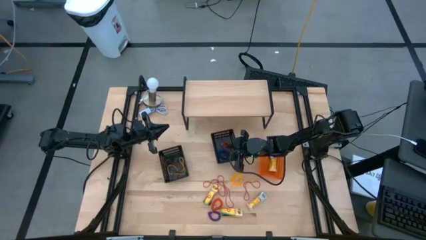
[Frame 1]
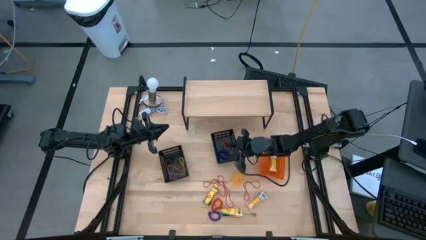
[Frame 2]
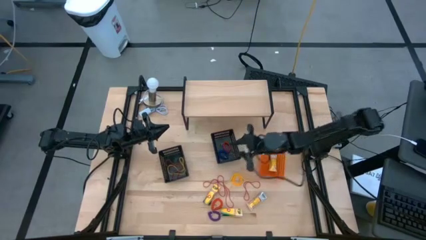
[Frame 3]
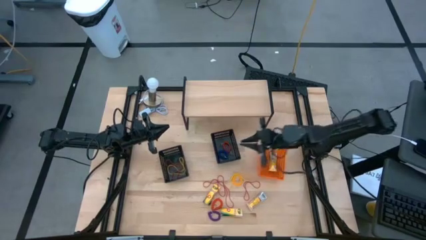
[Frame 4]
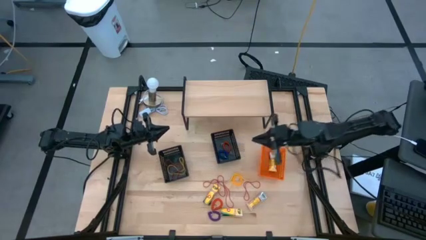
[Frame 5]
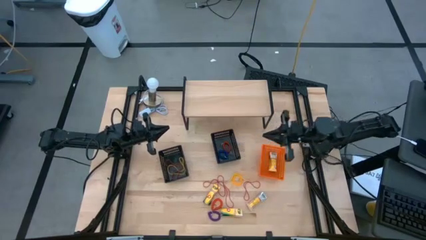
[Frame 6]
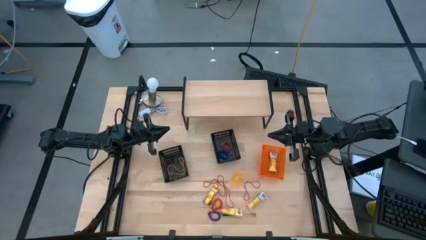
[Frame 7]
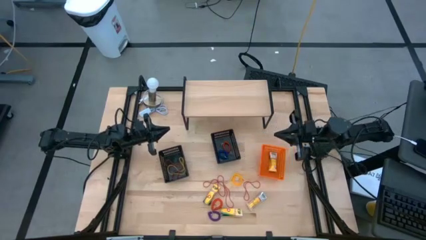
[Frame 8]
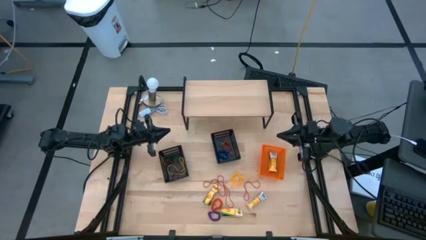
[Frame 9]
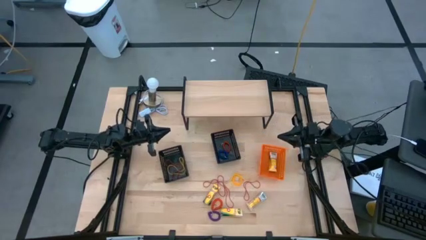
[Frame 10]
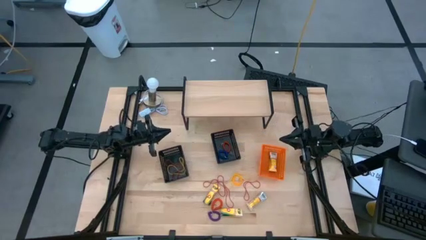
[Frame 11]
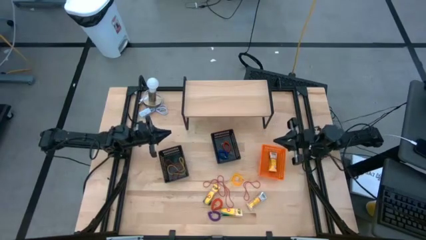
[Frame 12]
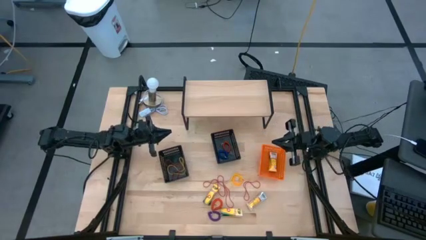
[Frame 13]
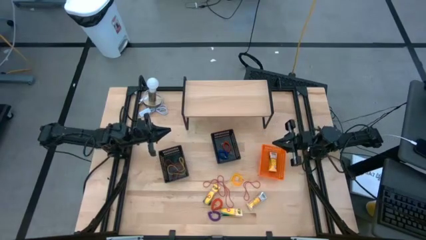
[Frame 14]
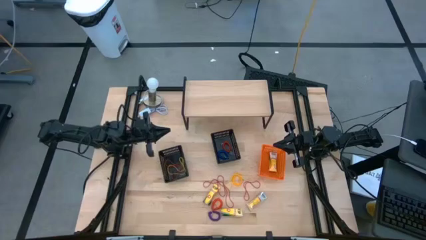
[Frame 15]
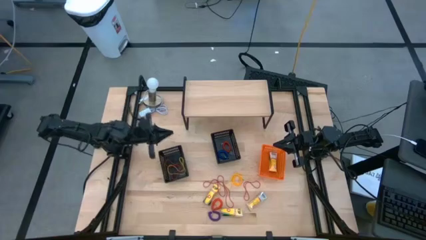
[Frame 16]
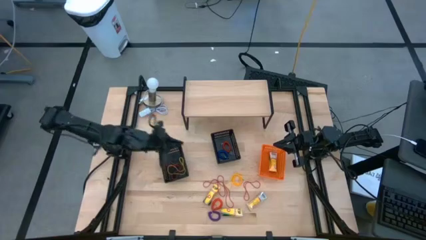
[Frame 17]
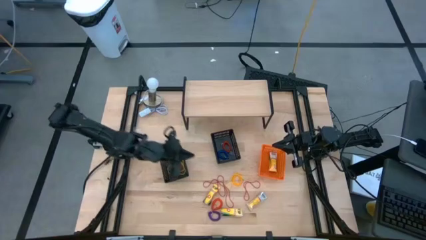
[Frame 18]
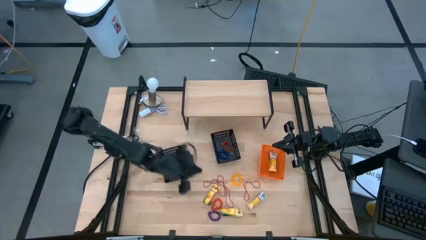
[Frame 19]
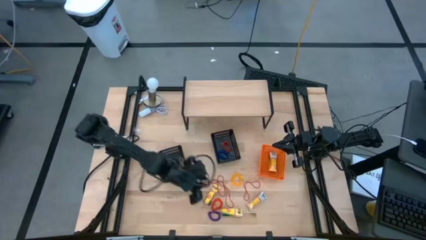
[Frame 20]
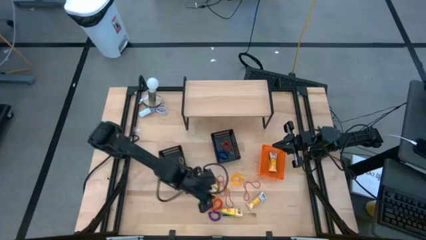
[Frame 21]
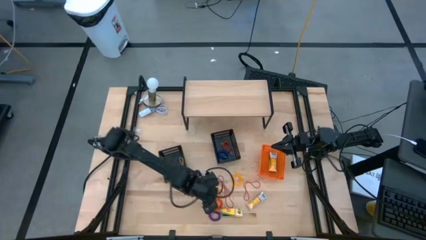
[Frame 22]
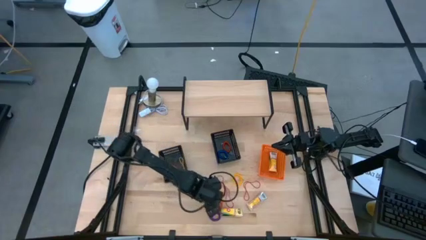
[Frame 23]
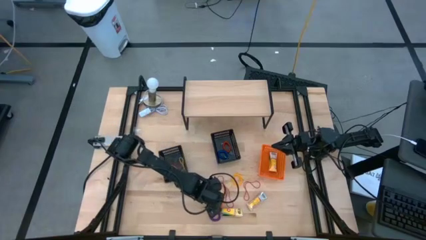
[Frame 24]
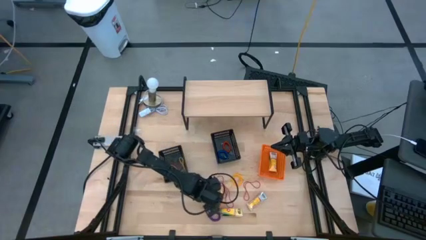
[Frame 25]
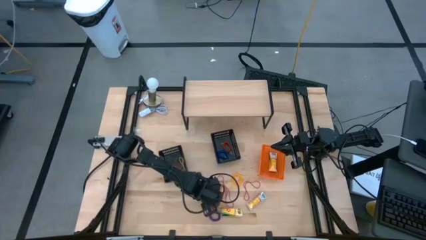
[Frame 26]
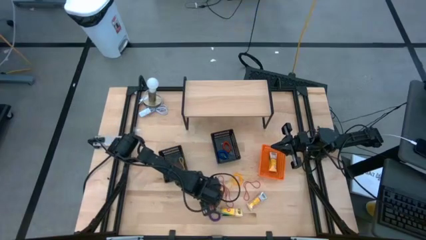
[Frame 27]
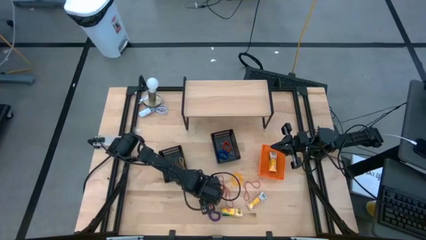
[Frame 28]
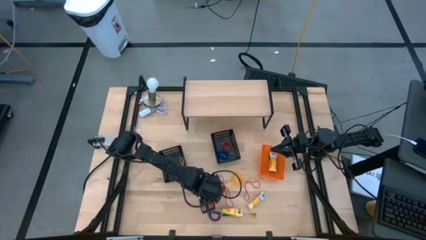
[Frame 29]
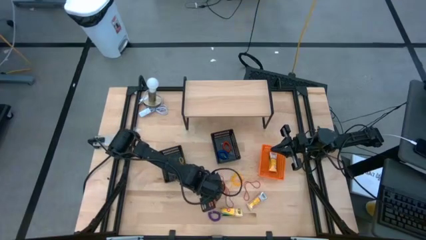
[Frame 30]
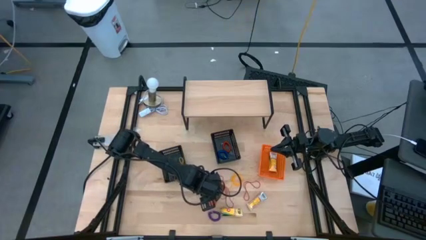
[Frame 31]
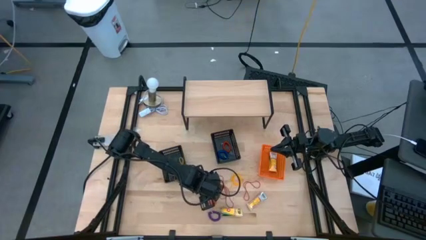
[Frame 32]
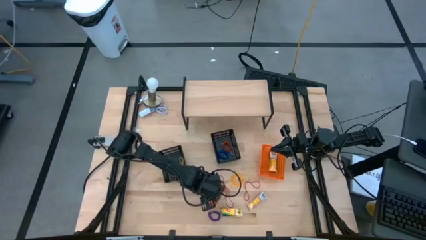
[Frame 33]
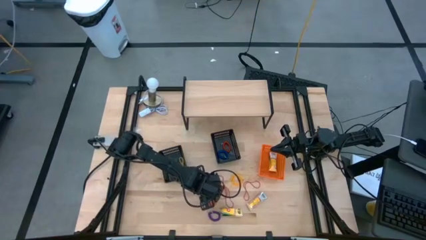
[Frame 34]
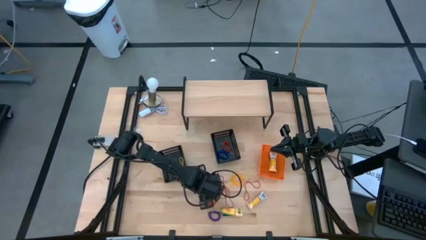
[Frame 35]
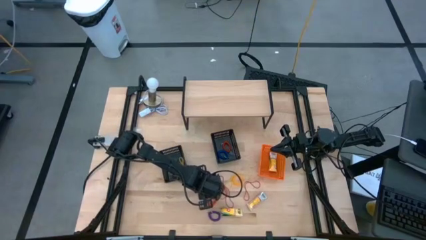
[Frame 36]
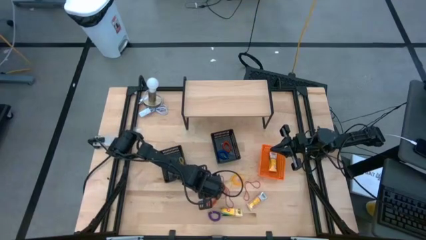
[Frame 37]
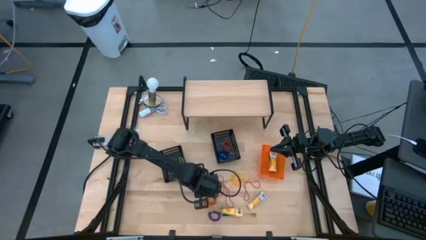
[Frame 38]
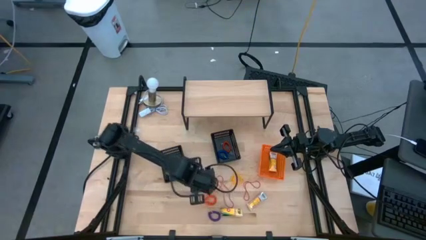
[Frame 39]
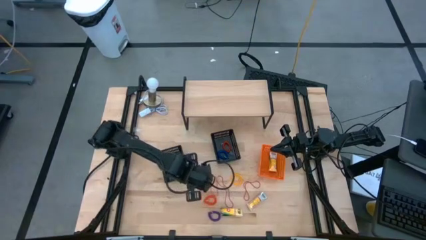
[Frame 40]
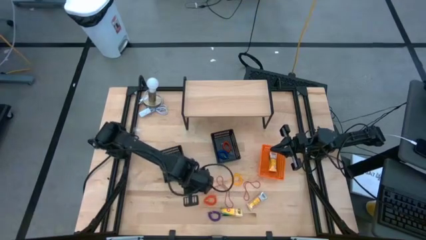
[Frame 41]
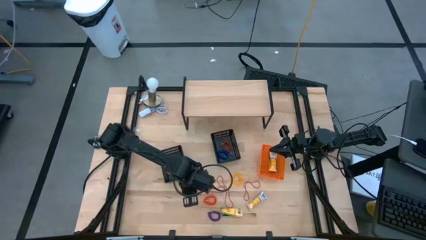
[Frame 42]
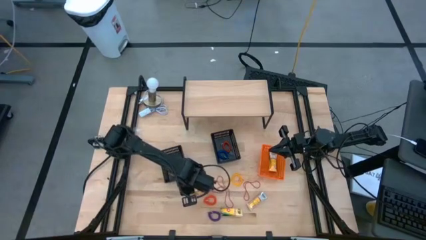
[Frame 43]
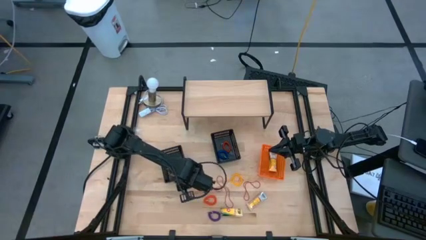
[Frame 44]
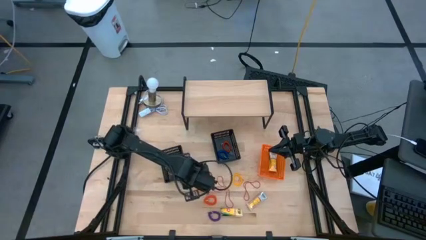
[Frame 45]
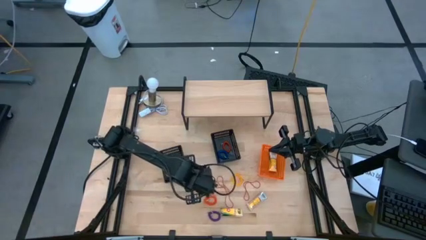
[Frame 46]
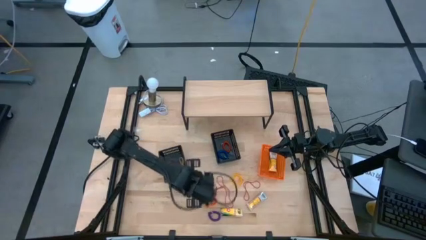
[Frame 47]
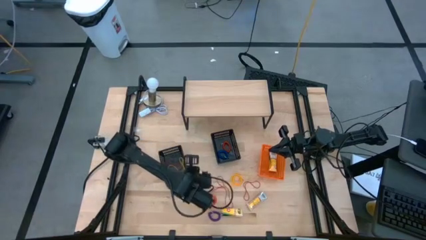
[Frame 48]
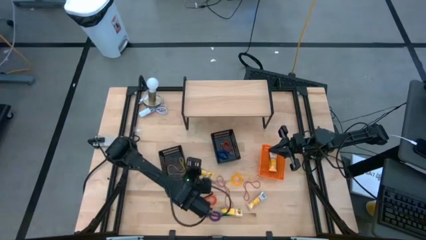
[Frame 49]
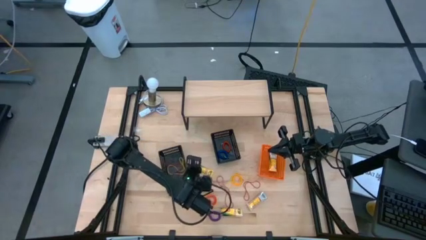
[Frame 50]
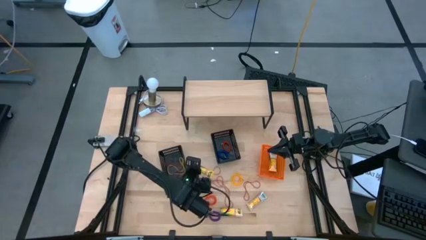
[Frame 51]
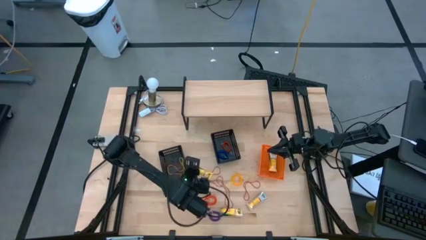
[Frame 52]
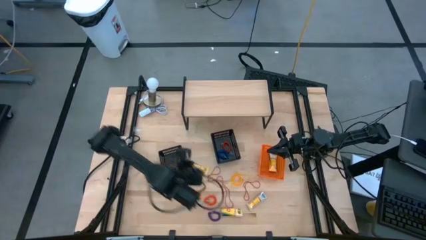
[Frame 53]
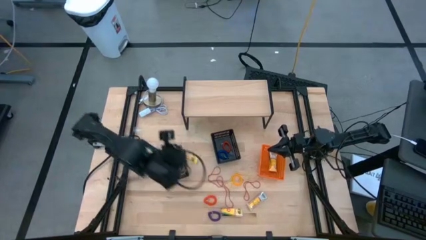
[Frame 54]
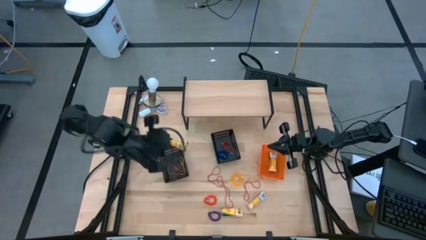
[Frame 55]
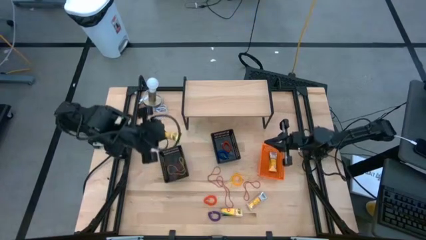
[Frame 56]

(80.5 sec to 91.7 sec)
Task: Pick & Place Office Desk Supplies
Put the crayon into the orange bin

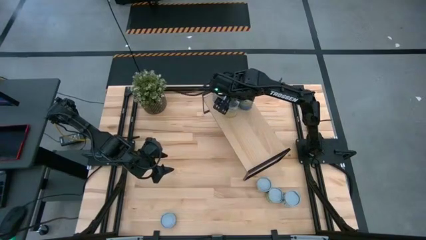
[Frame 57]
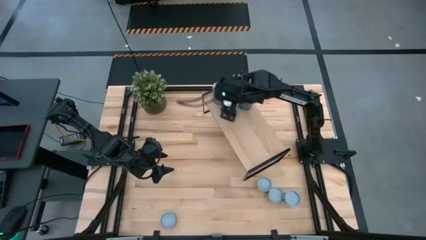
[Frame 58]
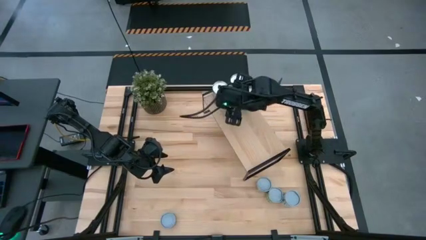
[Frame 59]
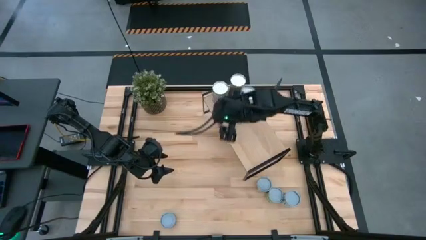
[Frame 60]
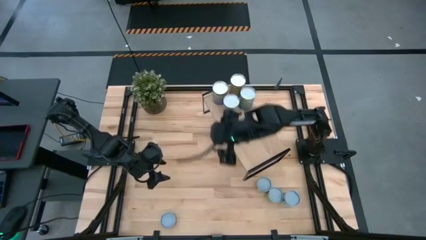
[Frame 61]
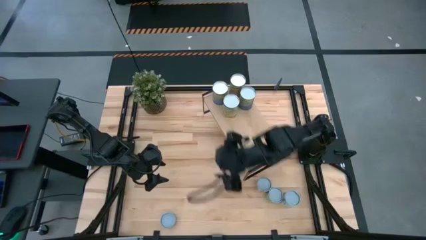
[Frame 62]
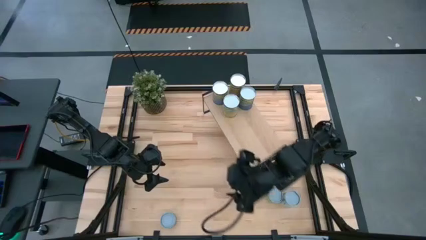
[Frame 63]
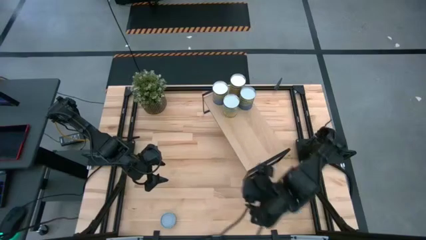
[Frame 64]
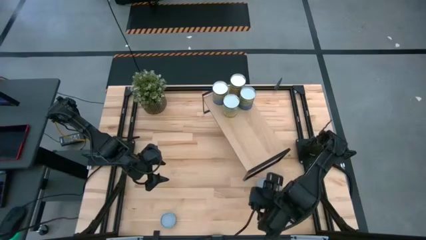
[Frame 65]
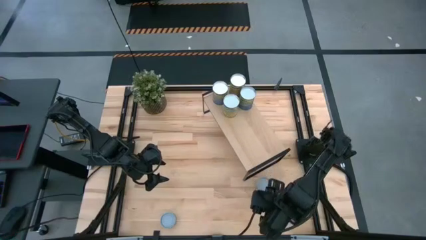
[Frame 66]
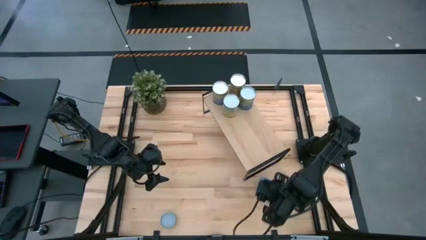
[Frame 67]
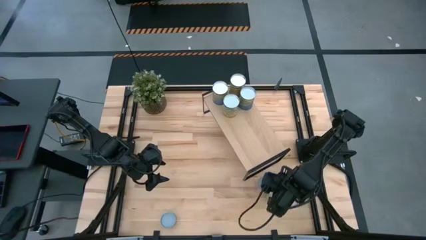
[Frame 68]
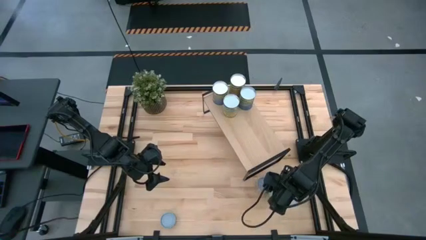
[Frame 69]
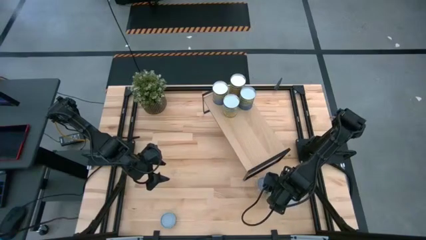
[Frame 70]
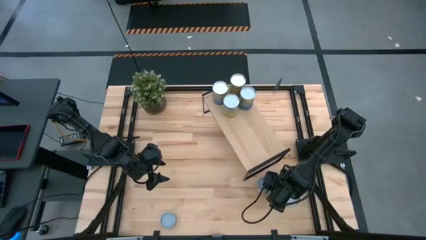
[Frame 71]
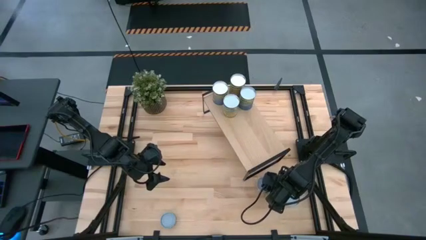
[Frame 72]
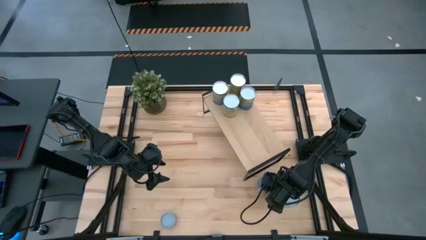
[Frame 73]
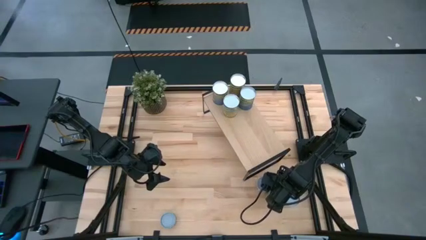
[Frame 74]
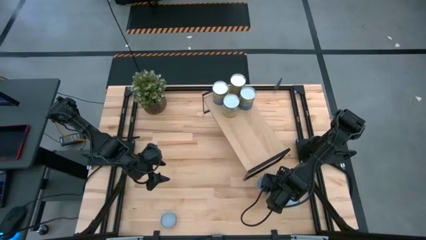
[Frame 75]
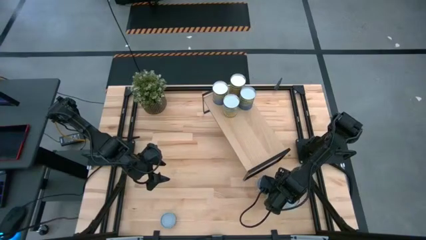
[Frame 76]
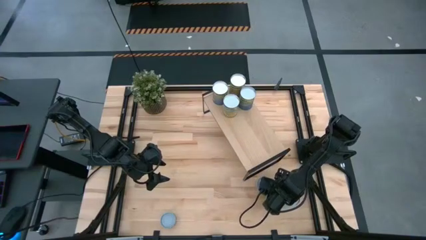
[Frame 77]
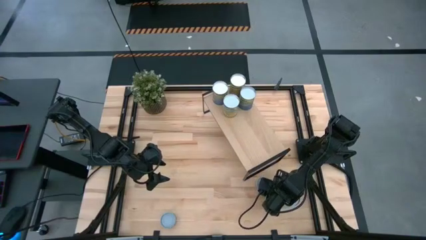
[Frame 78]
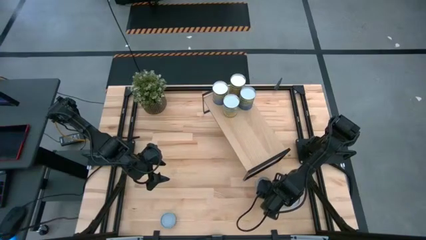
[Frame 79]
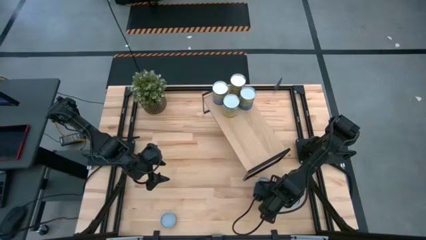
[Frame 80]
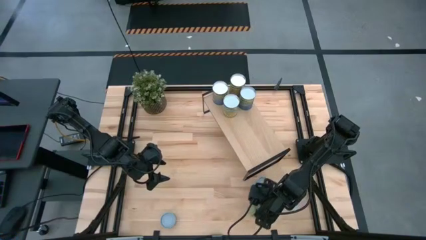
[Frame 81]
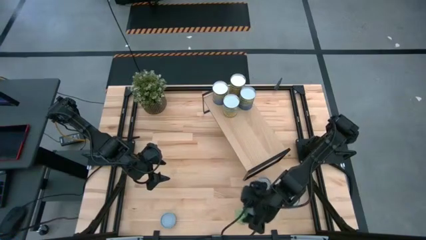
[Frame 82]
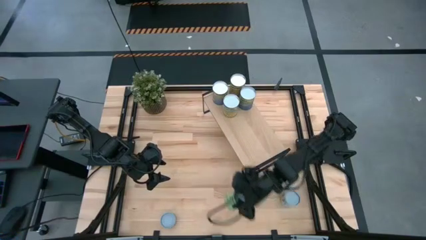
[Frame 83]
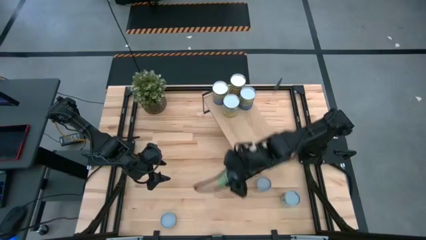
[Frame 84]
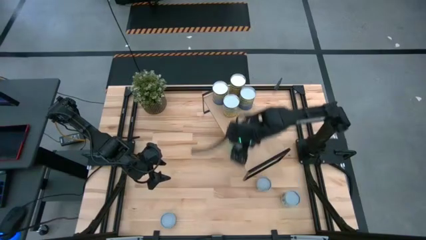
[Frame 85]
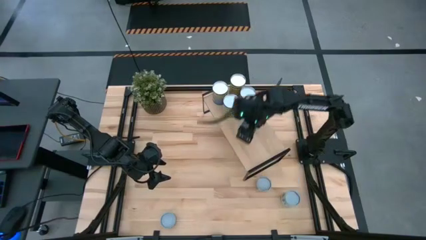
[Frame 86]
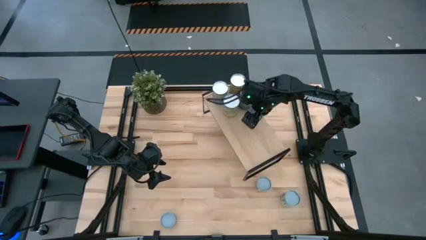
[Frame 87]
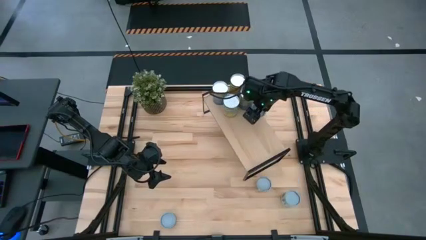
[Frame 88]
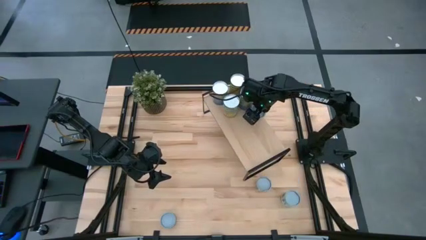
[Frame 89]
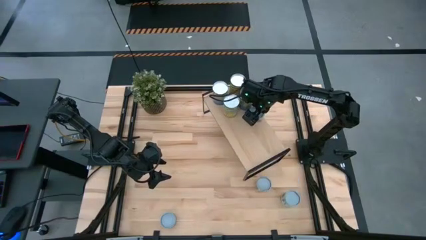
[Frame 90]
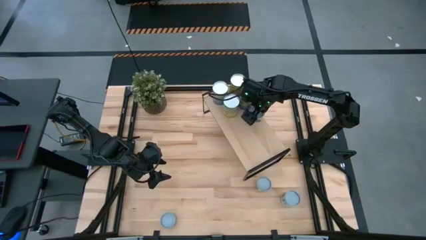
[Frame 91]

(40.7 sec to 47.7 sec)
Task: Pick and place cans onto a shelf
Put the canned green peas on the shelf
